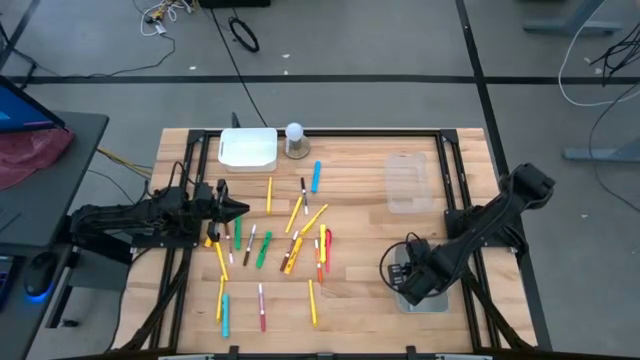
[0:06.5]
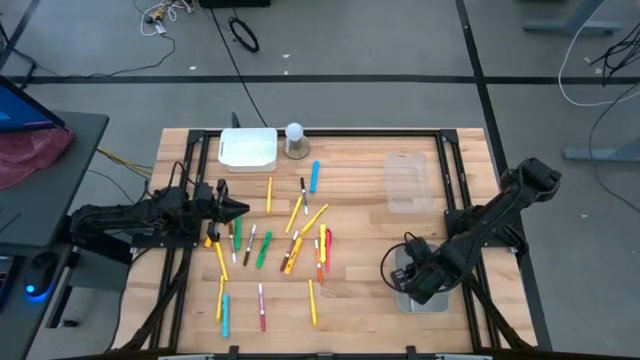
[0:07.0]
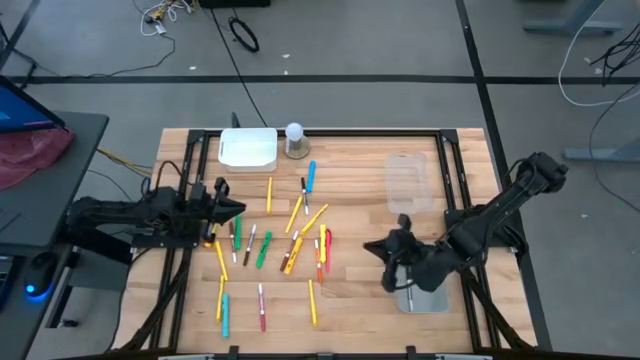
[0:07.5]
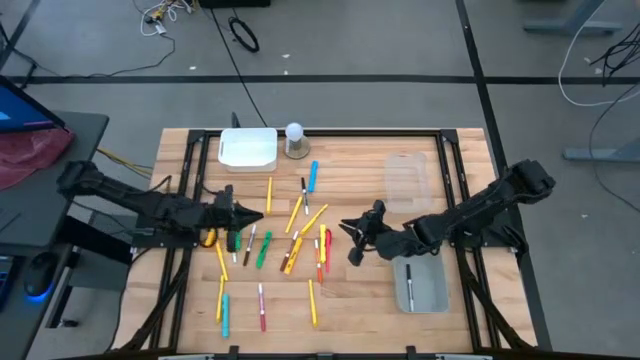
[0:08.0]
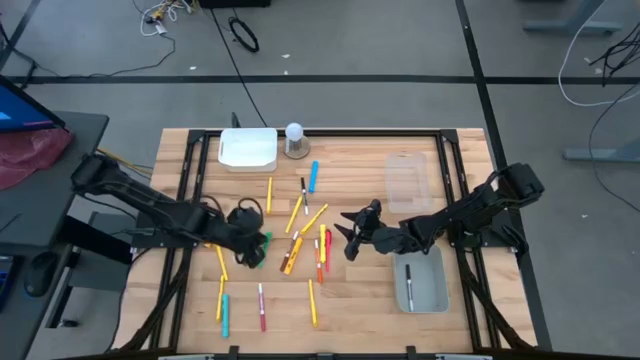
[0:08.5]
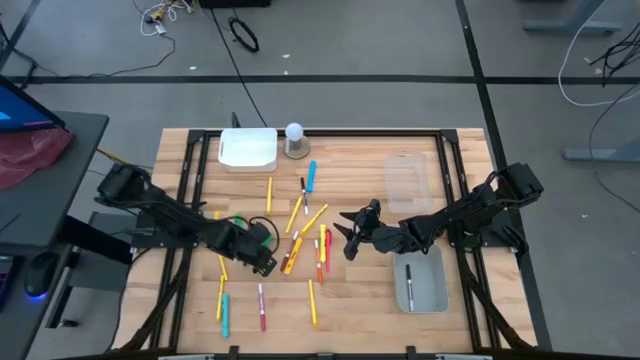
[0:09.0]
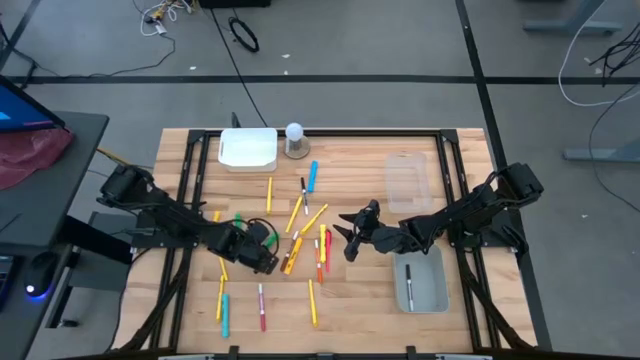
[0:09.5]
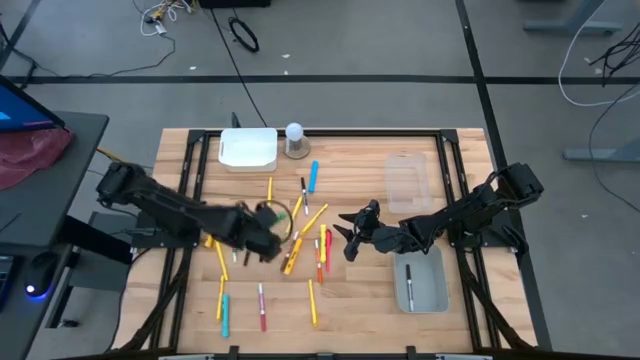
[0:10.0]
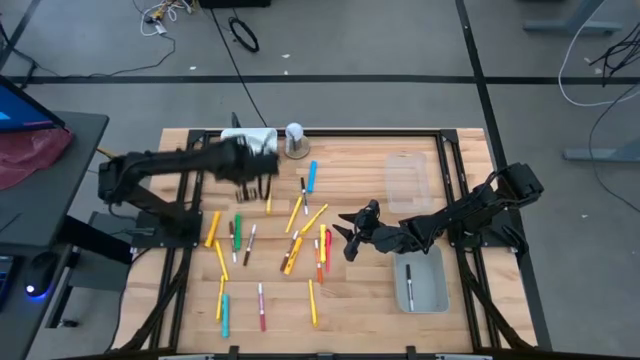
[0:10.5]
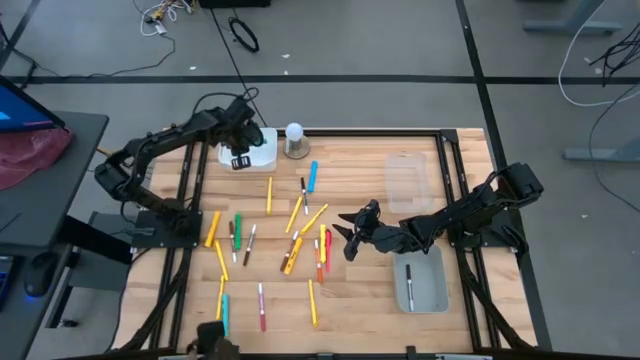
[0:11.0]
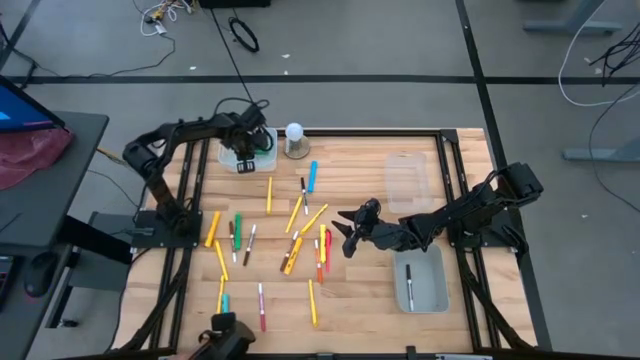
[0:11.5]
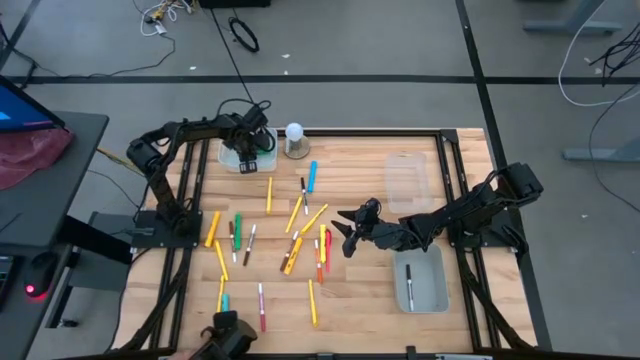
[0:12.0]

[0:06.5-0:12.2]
Task: Pick & Place Markers
Put the green highlighter into the white bin

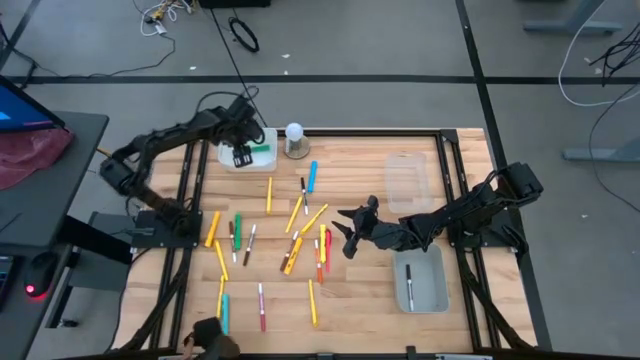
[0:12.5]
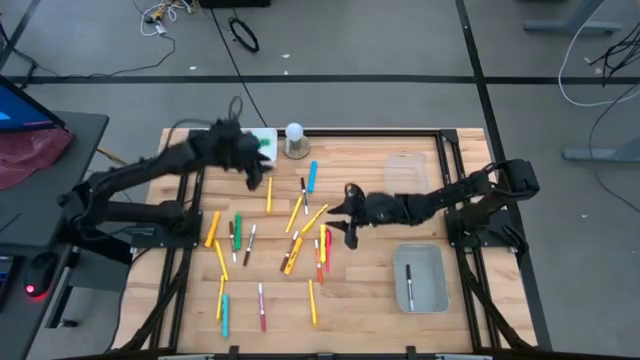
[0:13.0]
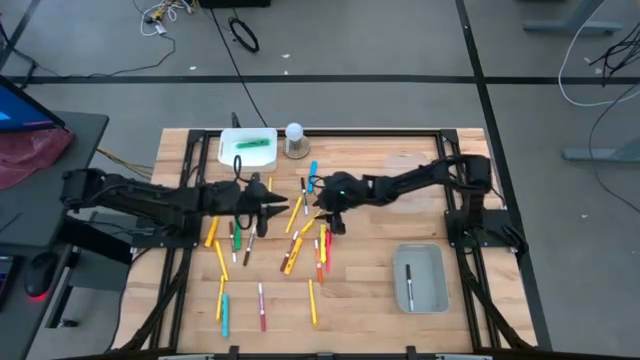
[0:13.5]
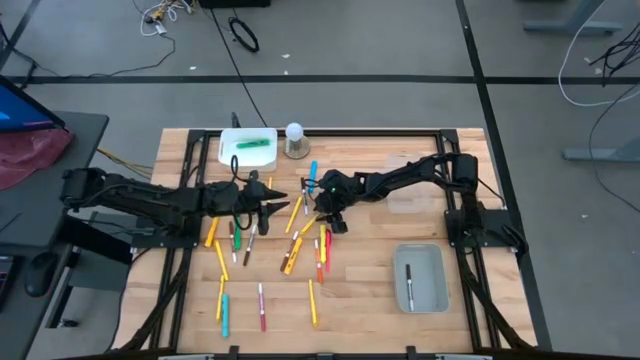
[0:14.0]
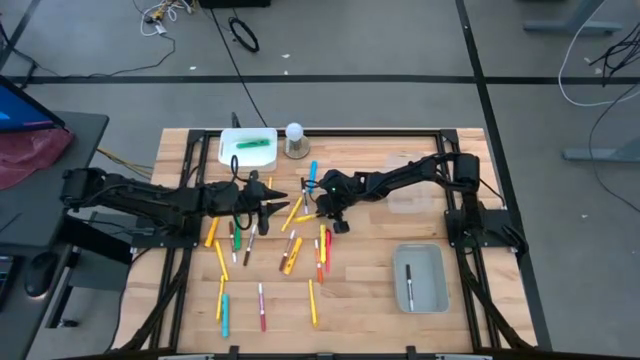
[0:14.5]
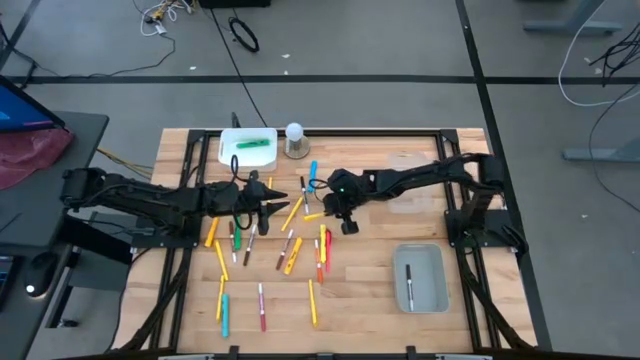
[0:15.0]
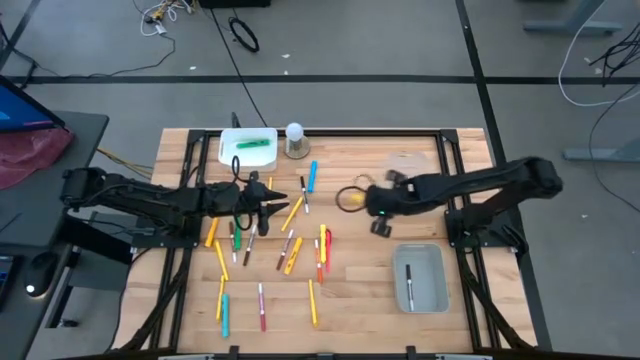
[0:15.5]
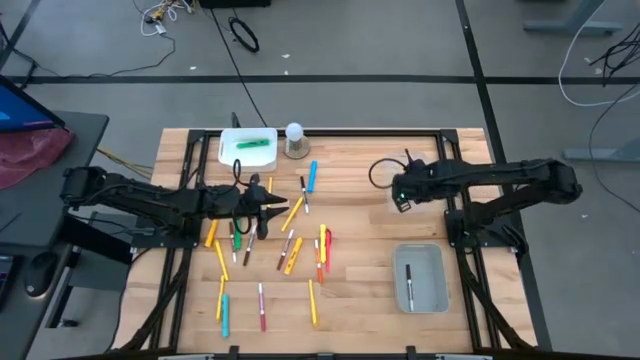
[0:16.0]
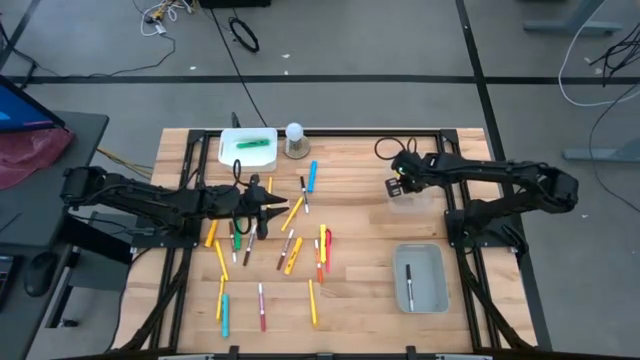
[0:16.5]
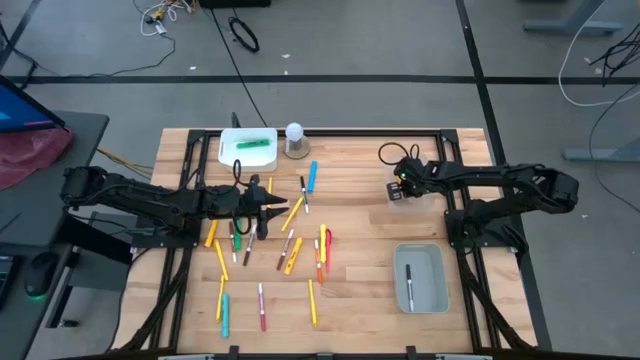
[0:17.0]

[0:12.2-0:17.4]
Put the yellow pen into the transparent bin

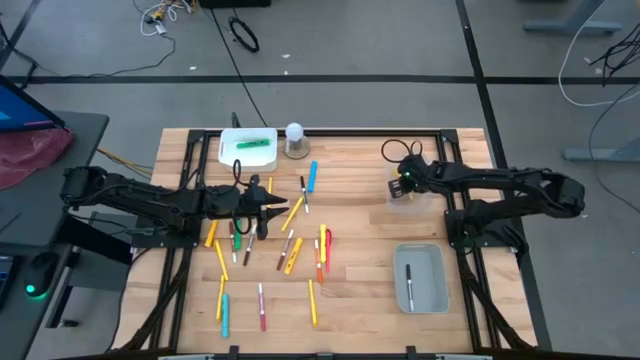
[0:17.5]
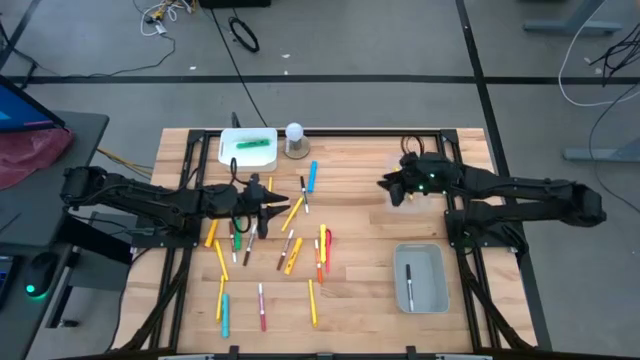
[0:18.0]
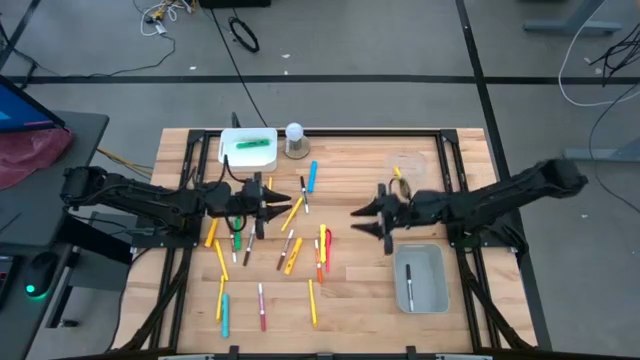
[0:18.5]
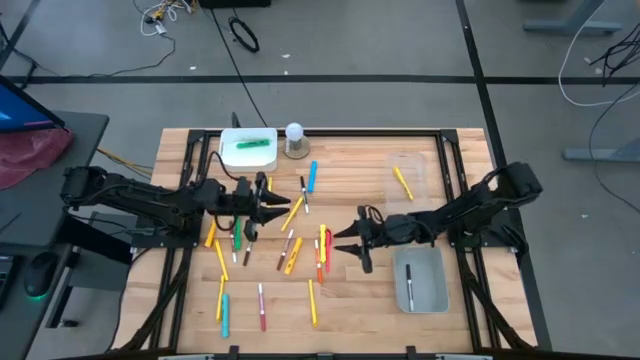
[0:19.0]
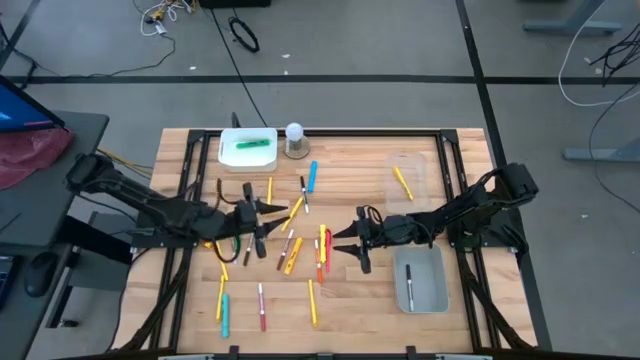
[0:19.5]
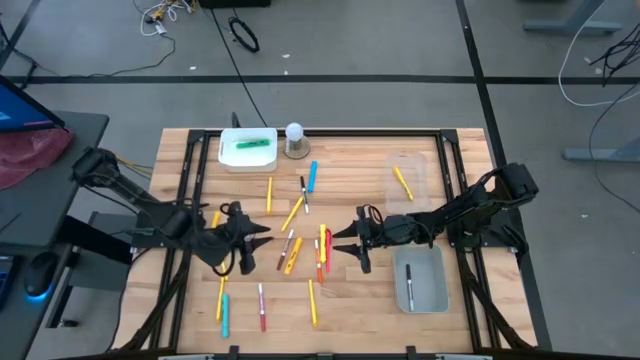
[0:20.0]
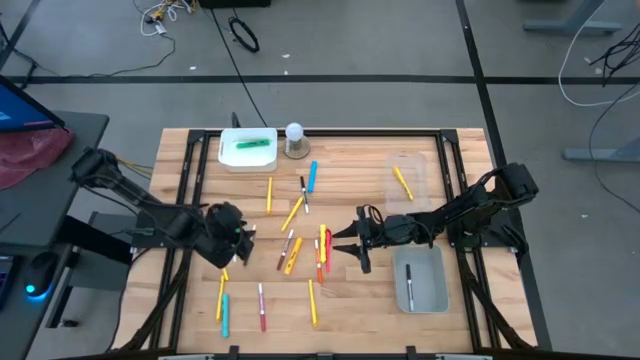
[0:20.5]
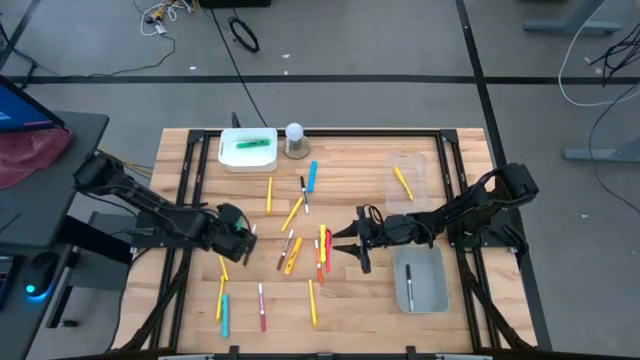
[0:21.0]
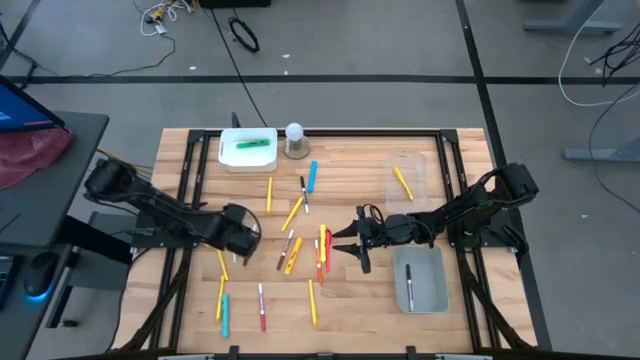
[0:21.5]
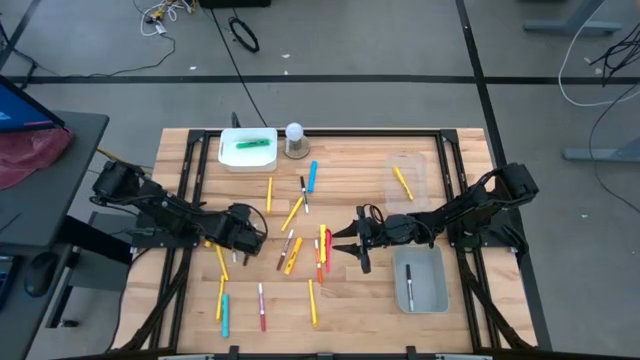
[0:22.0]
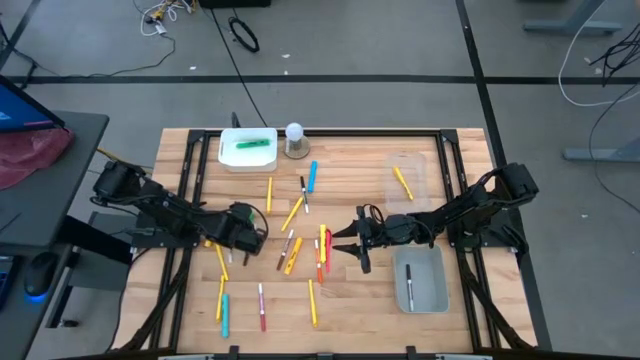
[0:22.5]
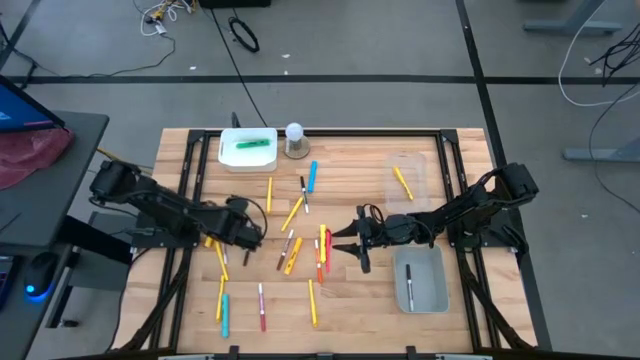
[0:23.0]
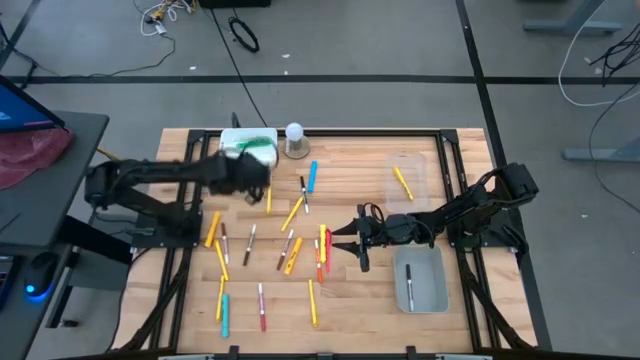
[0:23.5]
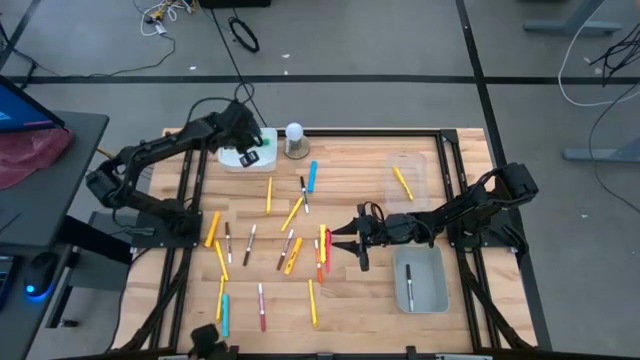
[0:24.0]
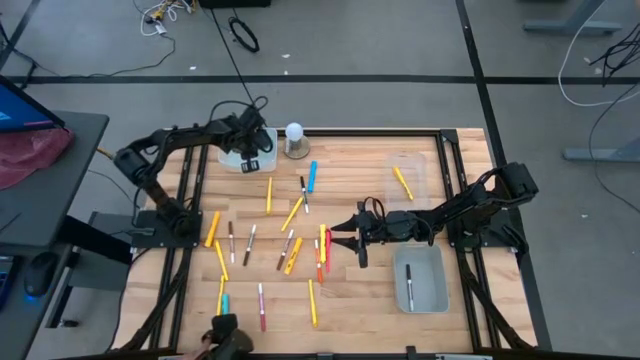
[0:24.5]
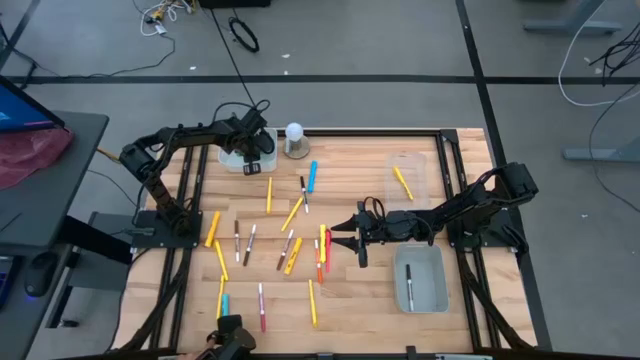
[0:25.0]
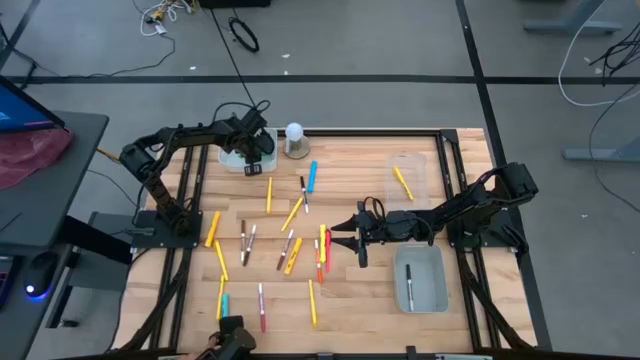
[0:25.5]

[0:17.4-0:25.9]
Put the green highlighter into the white bin
